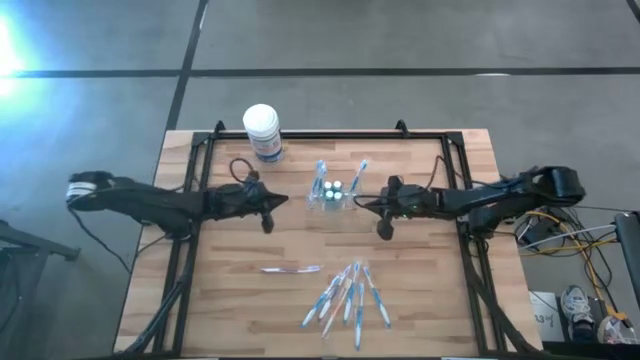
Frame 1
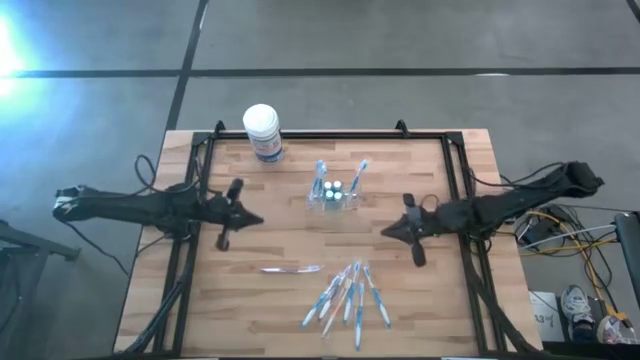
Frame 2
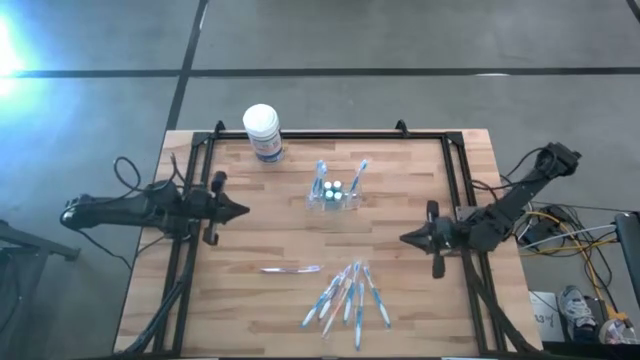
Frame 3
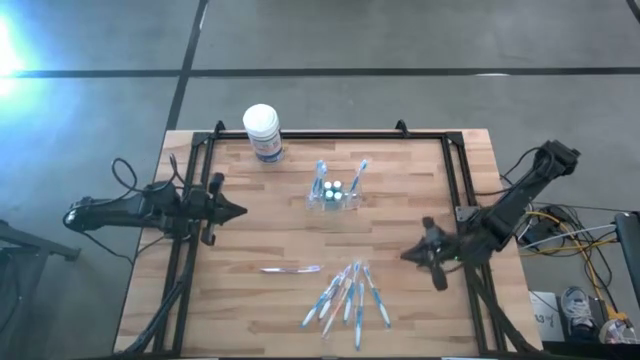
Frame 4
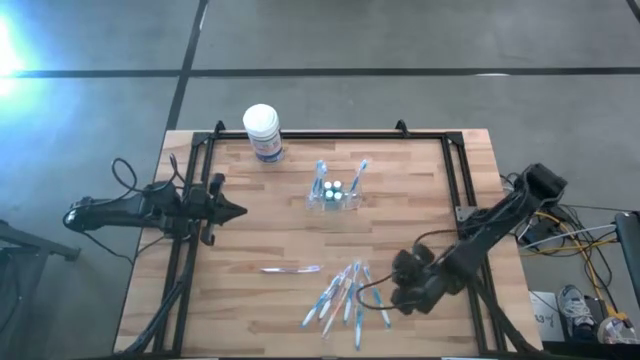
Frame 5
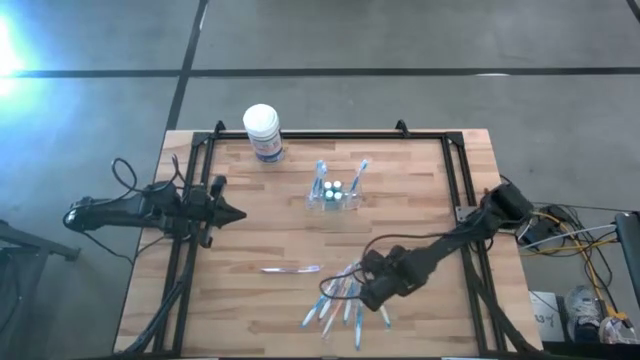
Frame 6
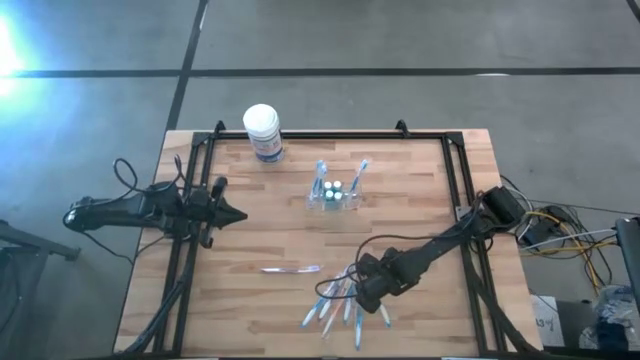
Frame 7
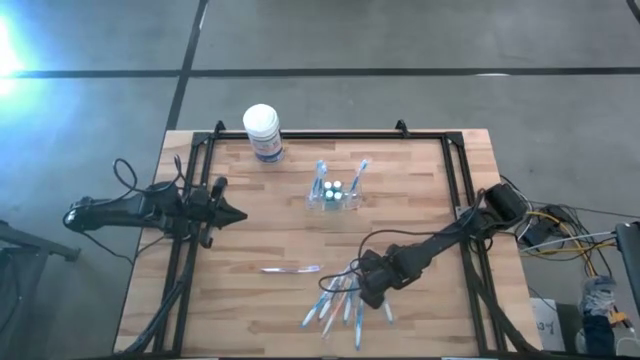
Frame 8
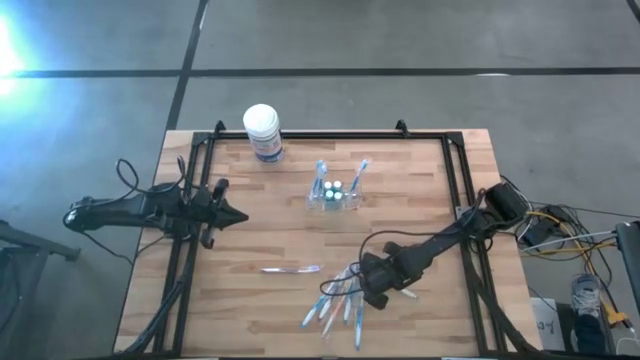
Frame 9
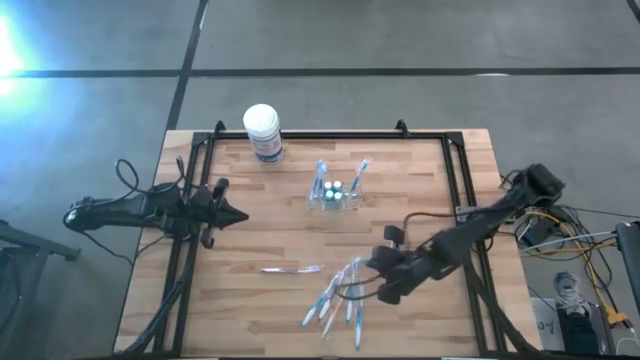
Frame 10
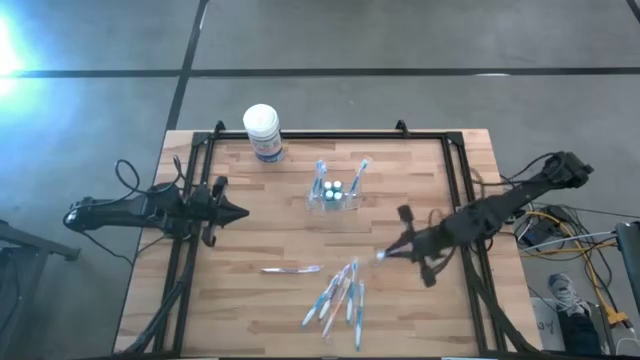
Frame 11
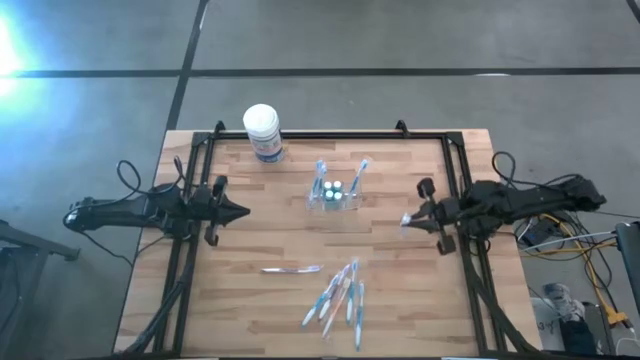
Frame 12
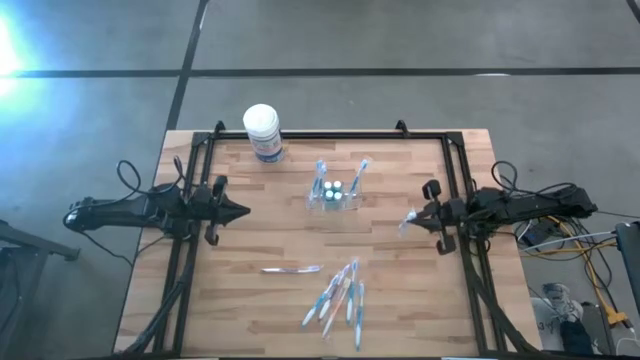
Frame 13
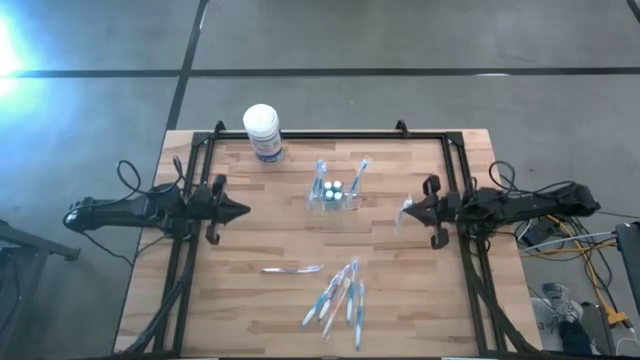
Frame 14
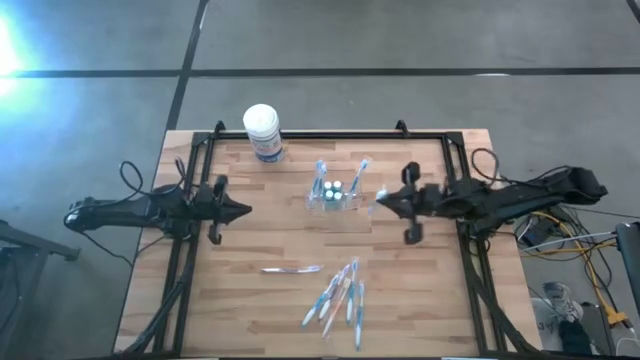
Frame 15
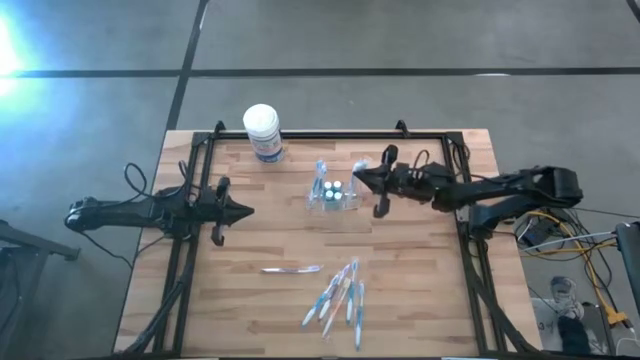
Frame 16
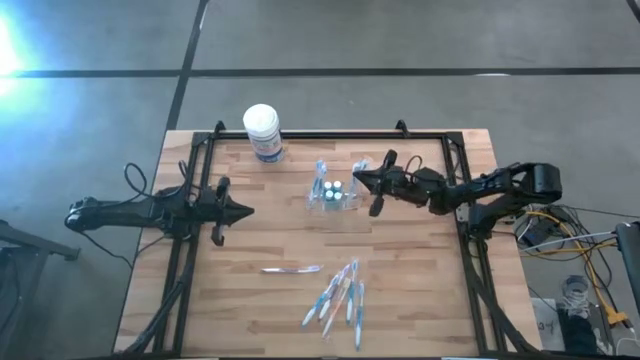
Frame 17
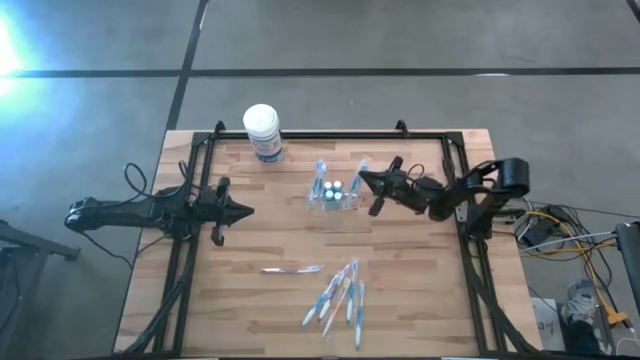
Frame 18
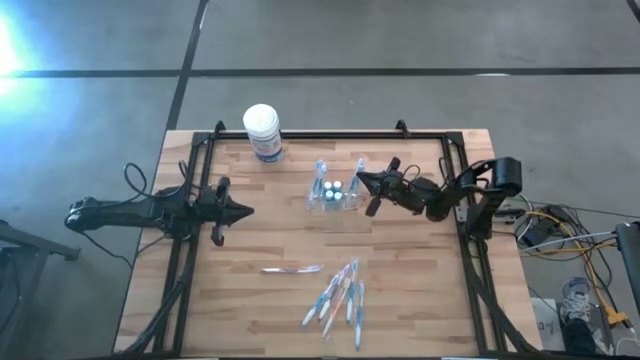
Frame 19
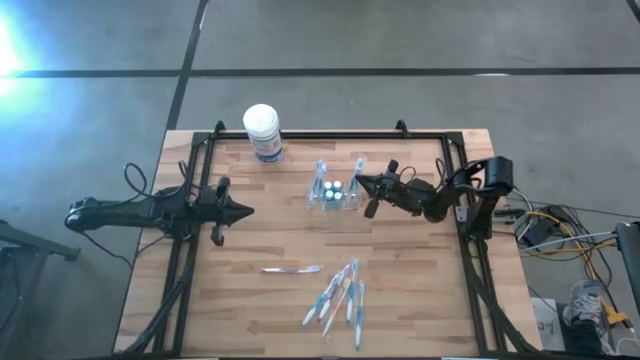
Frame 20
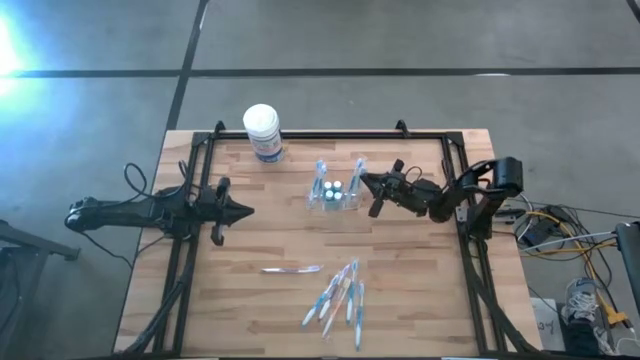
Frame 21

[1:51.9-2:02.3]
Task: Pick & Place toothbrushing station
Put the blue toothbrush into the transparent bin organizer

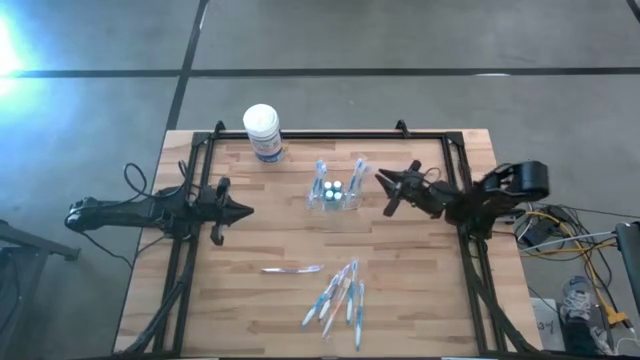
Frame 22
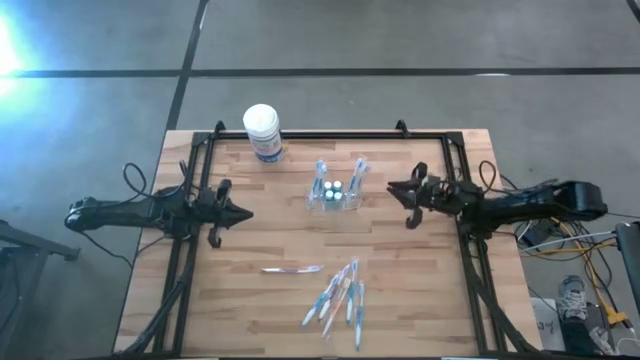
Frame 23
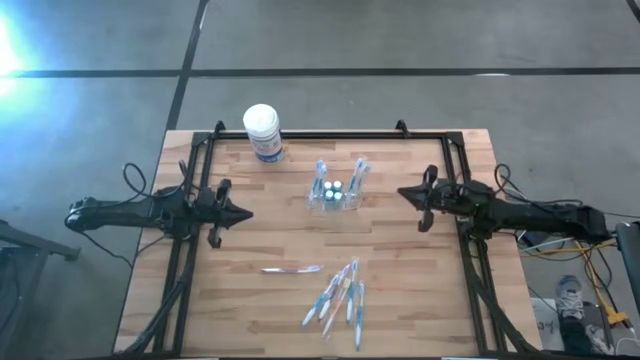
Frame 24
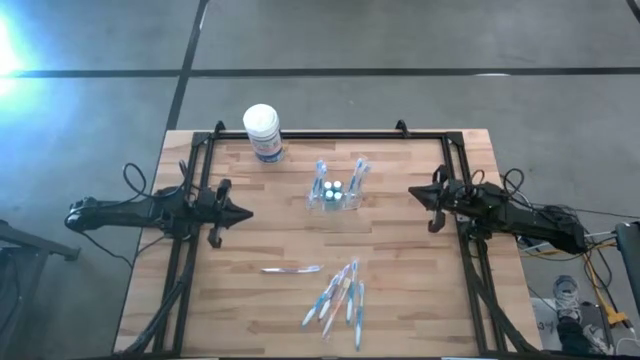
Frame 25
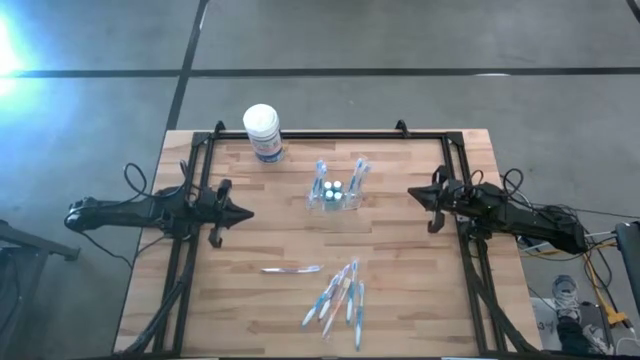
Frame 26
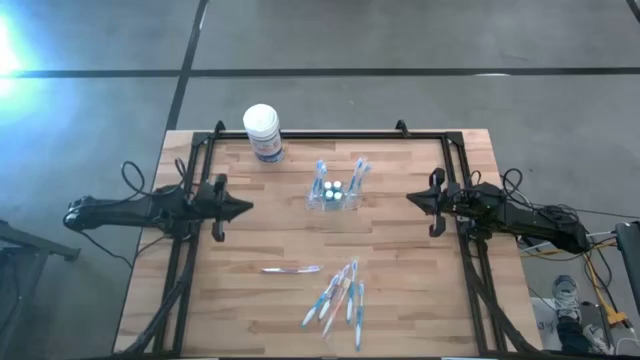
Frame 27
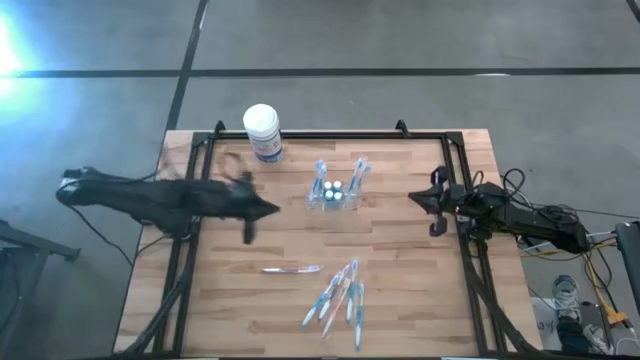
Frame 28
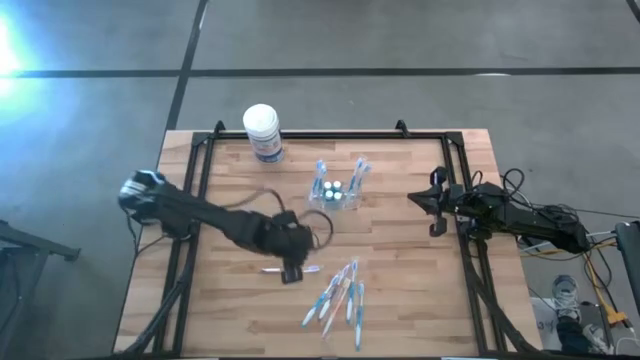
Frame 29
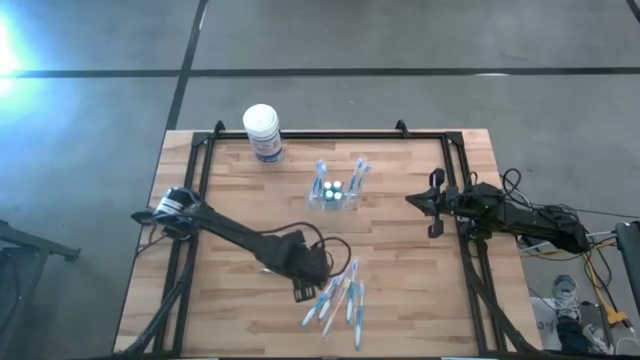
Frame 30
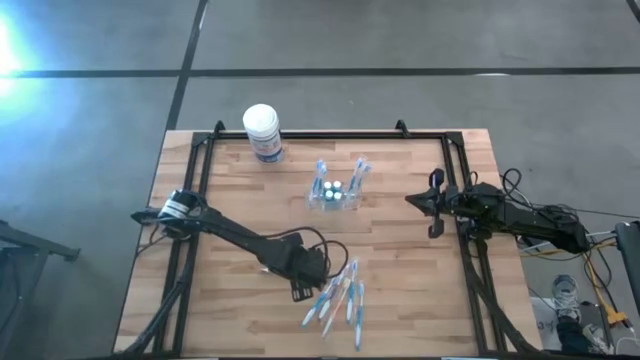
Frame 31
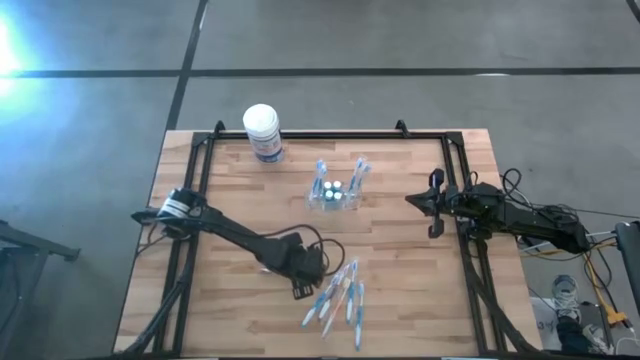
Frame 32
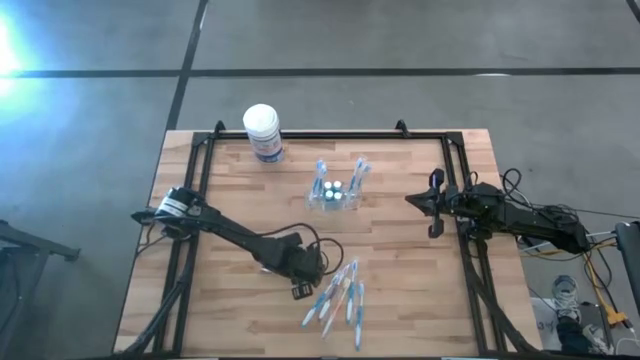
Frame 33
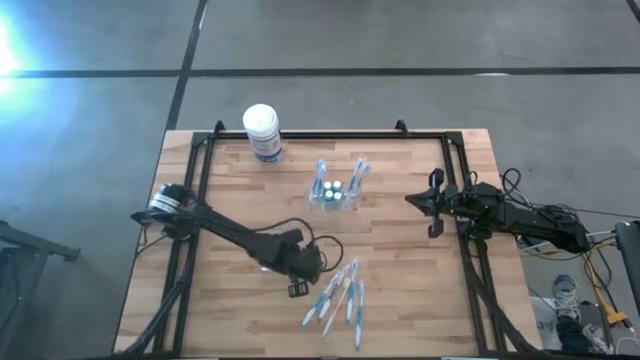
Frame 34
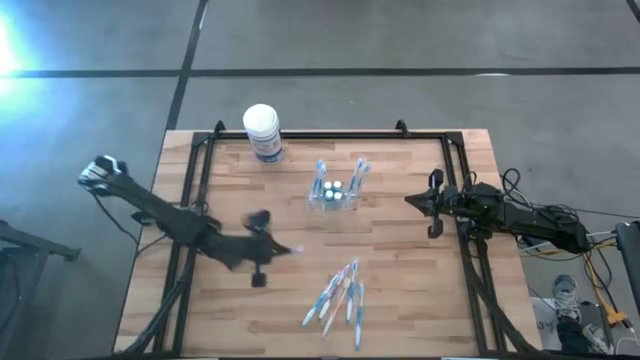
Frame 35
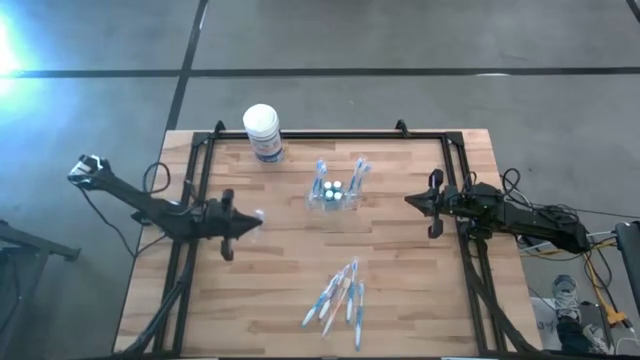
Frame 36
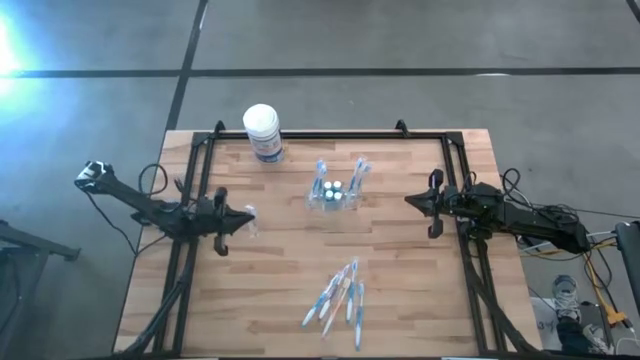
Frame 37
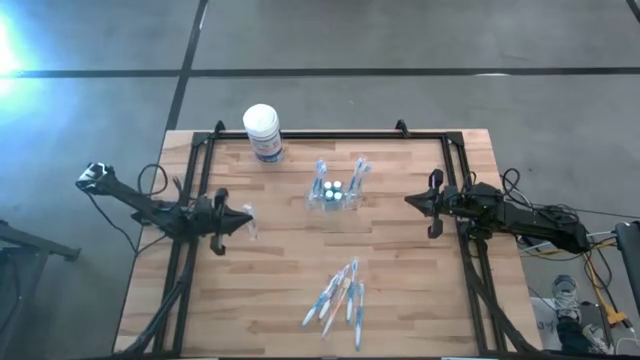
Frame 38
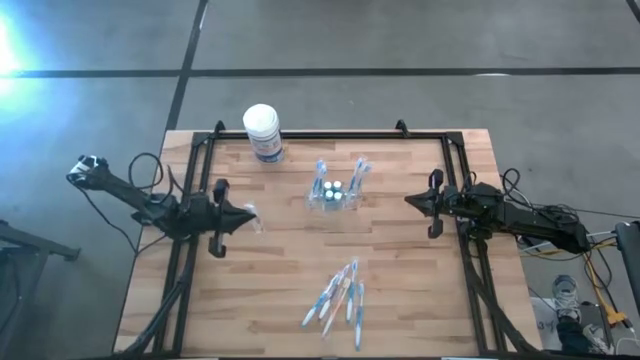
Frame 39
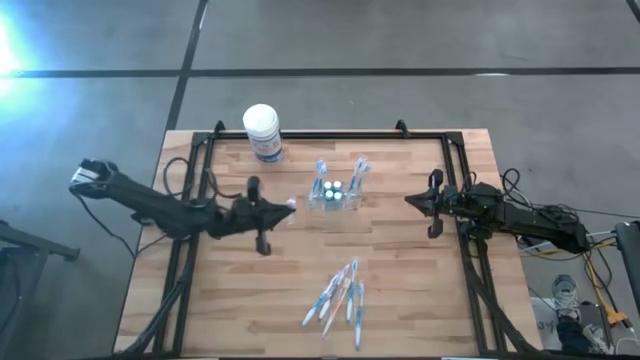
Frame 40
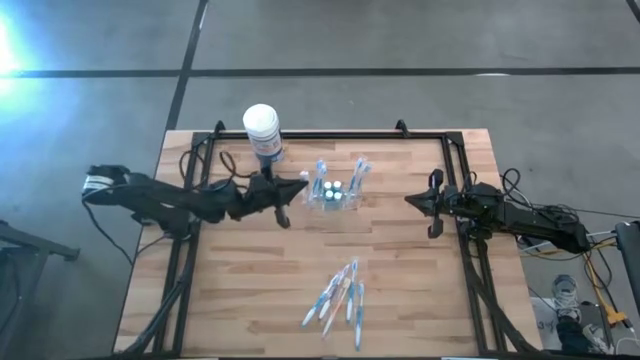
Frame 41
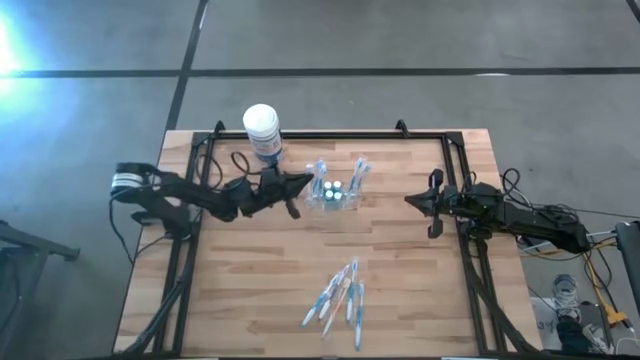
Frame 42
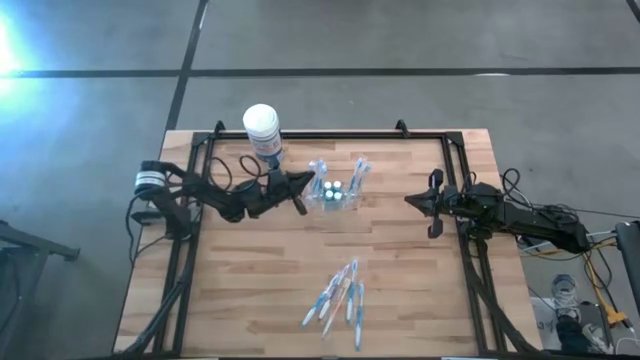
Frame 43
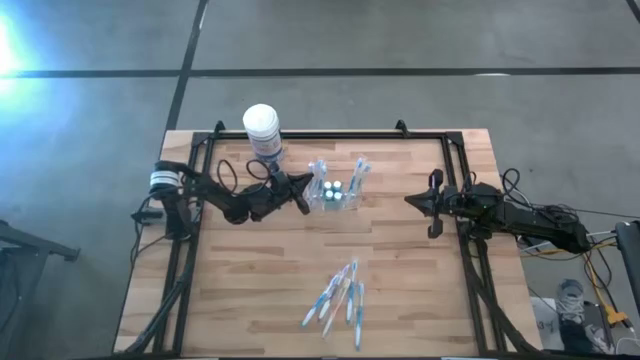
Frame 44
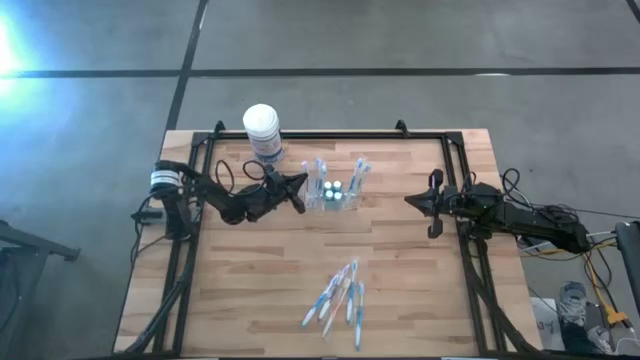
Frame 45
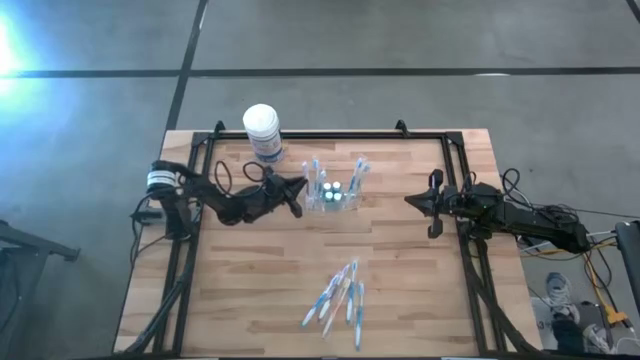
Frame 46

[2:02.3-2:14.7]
Put the violet toothbrush into the transparent bin organizer
